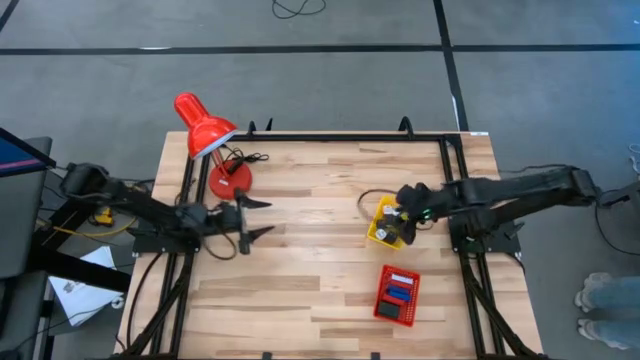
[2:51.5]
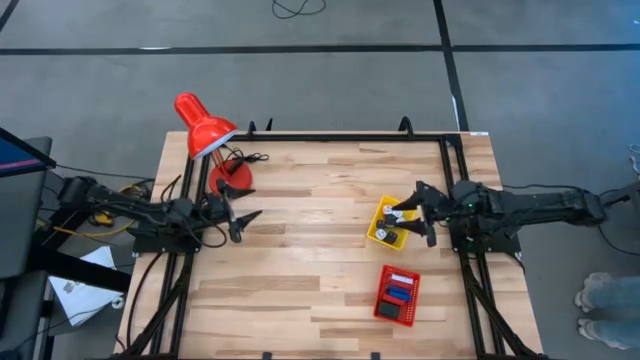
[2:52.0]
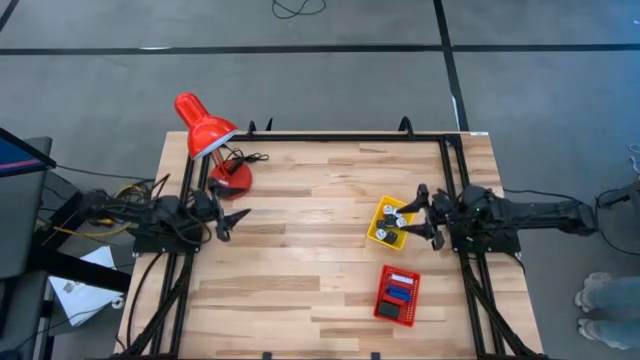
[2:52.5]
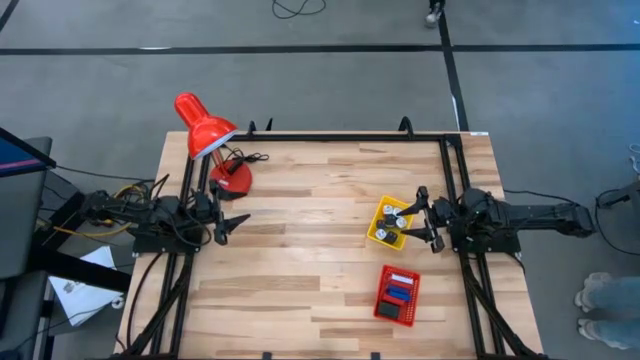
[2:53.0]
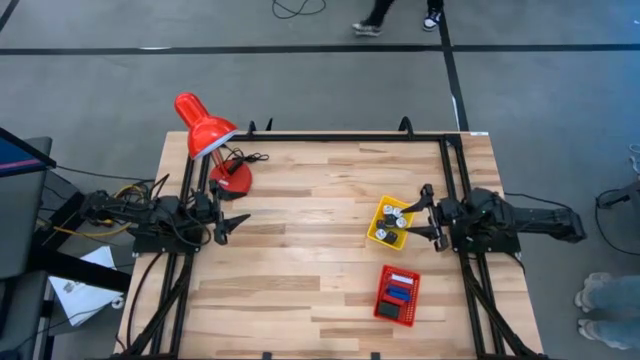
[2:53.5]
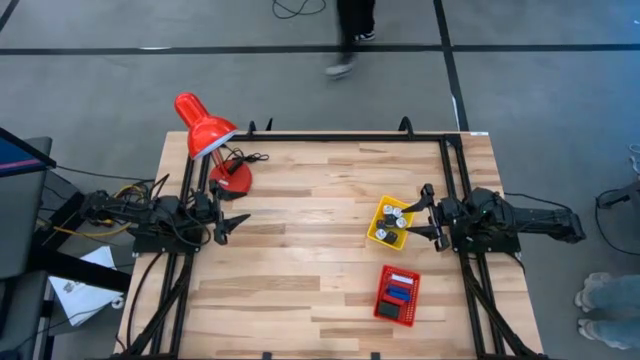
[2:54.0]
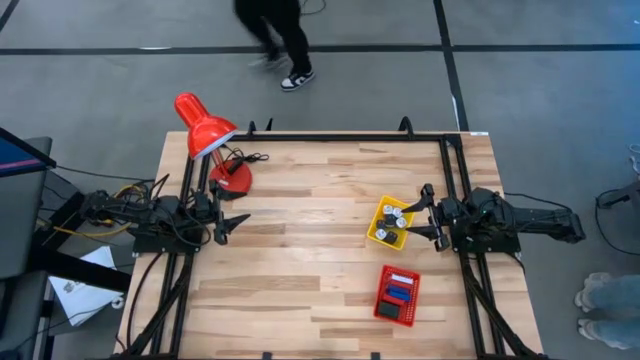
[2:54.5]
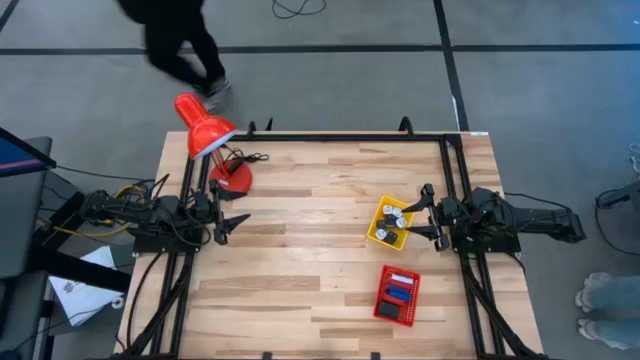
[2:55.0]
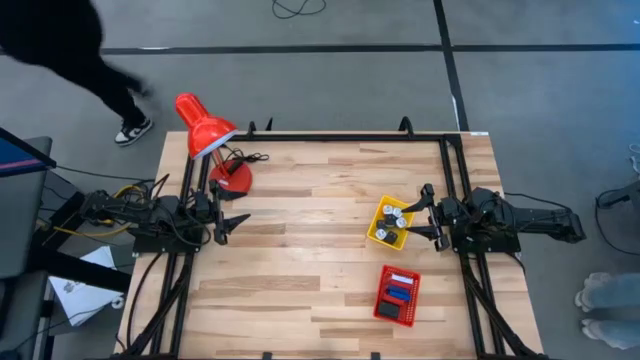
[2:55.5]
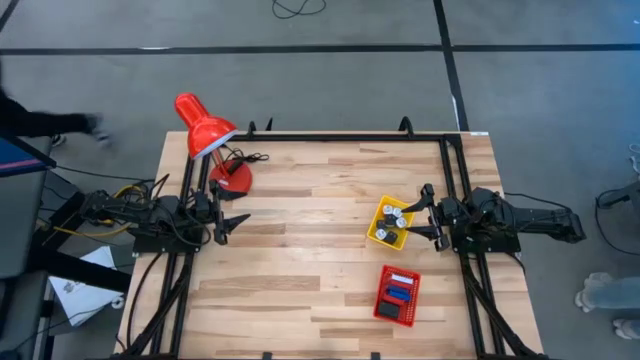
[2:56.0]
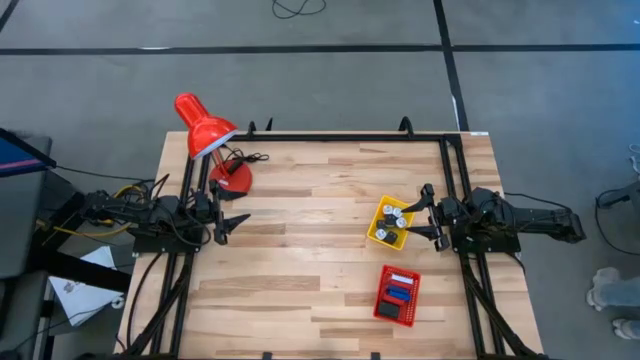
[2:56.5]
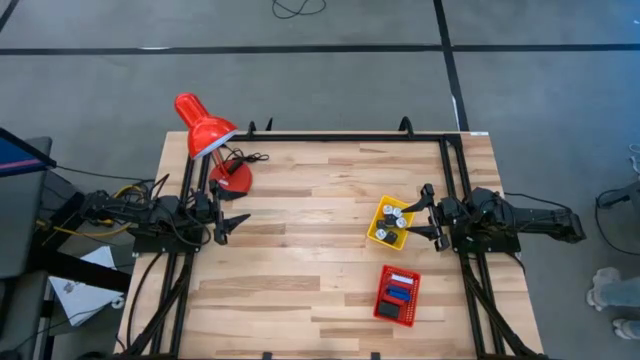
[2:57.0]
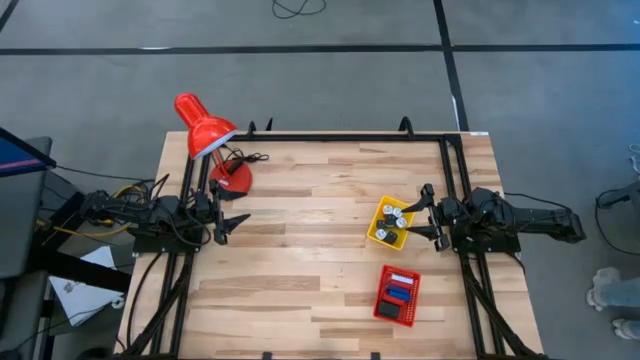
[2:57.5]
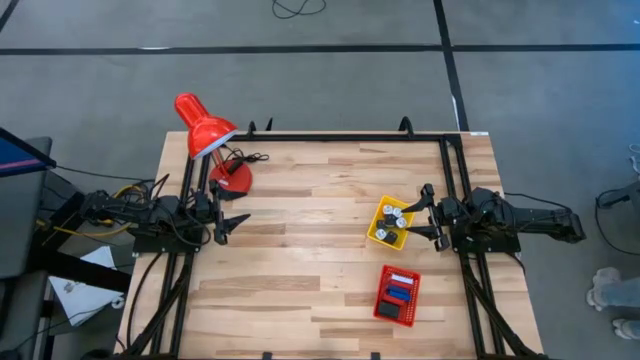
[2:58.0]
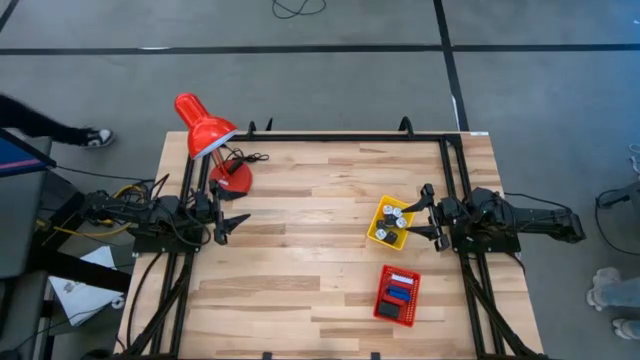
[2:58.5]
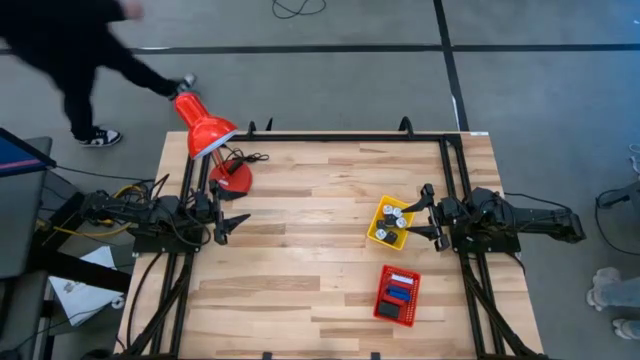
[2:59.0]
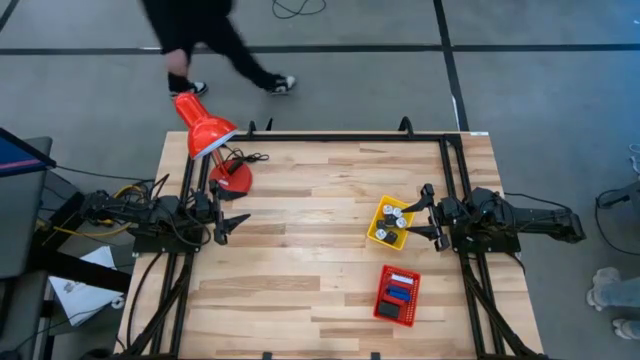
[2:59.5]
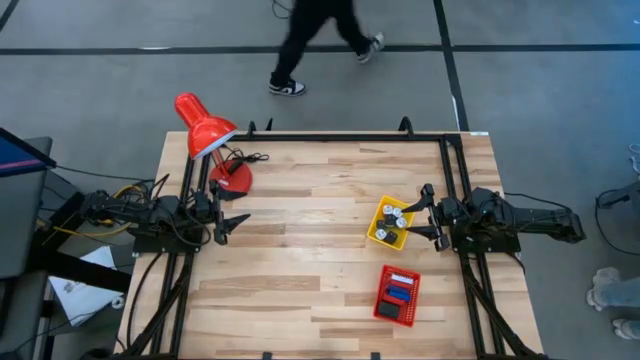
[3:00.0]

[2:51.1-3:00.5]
Task: Pick & Place Office items
Return to Home Position

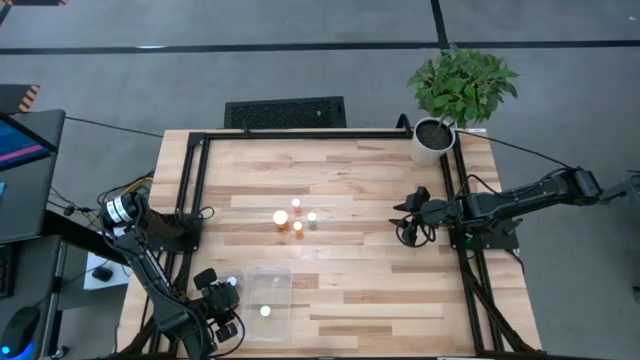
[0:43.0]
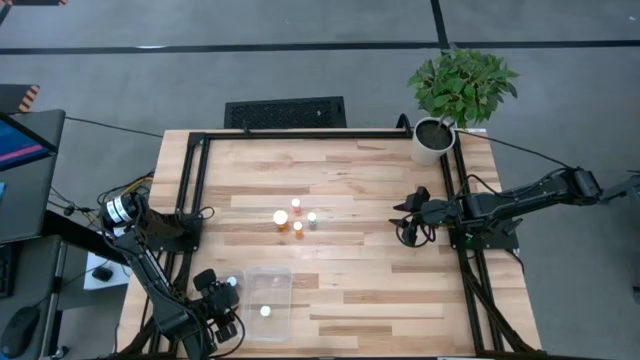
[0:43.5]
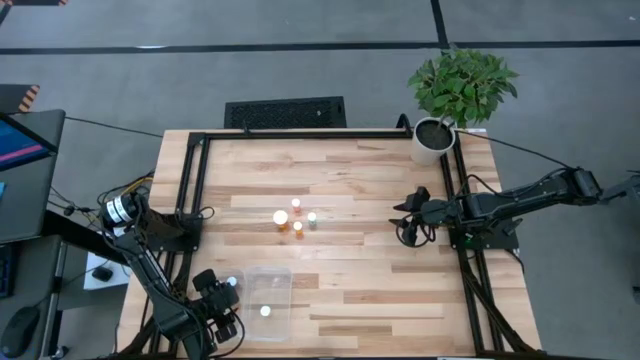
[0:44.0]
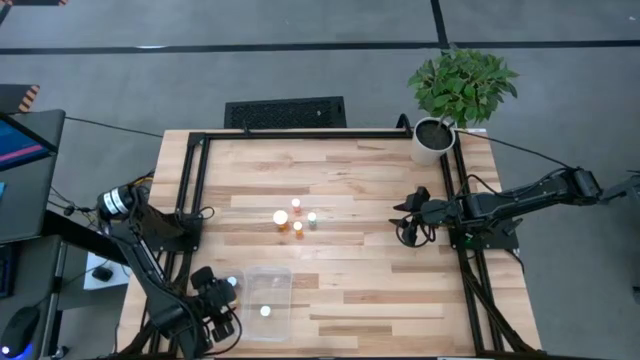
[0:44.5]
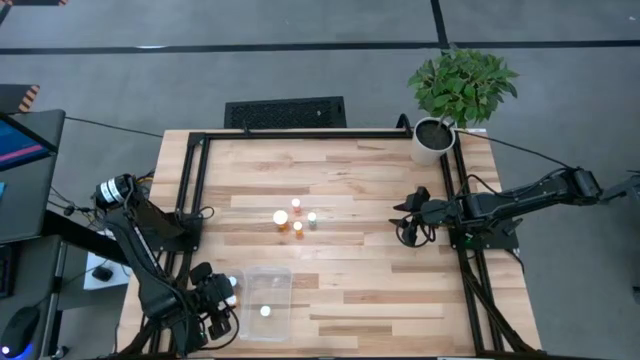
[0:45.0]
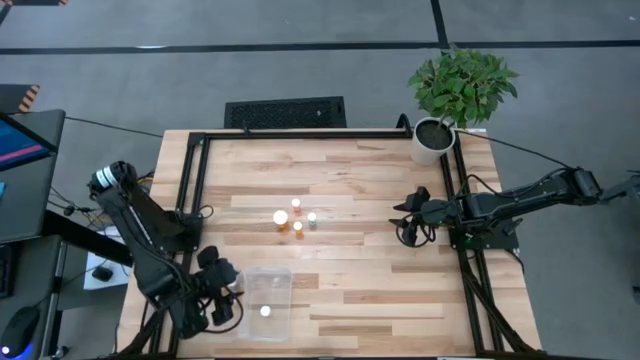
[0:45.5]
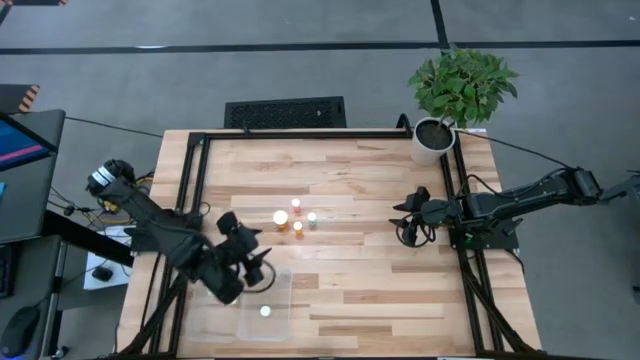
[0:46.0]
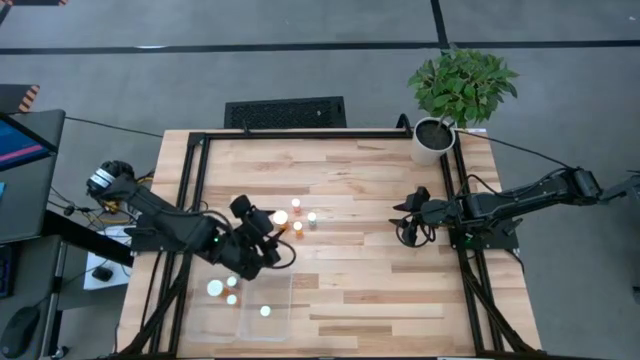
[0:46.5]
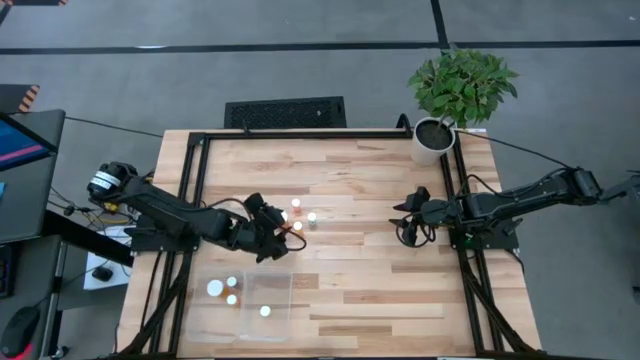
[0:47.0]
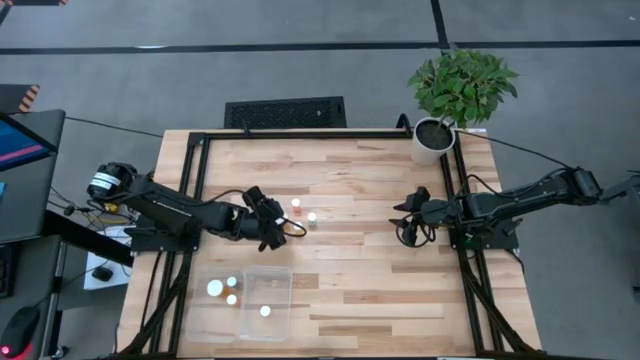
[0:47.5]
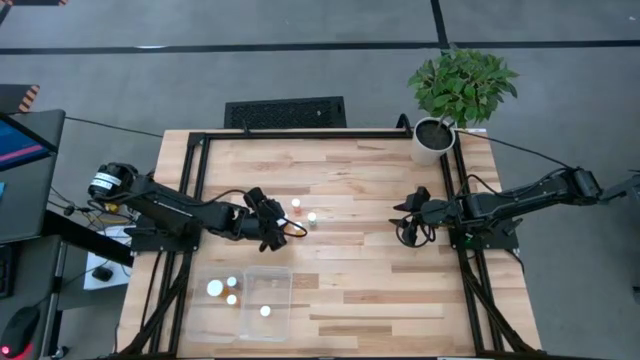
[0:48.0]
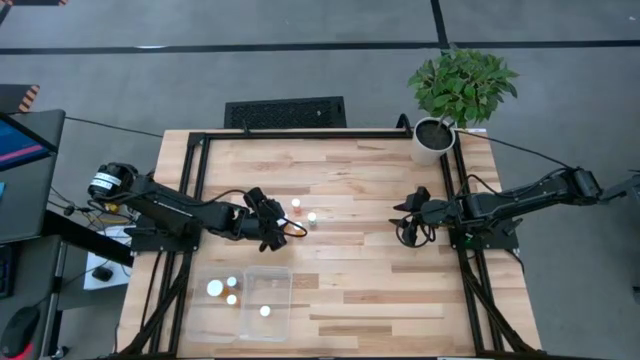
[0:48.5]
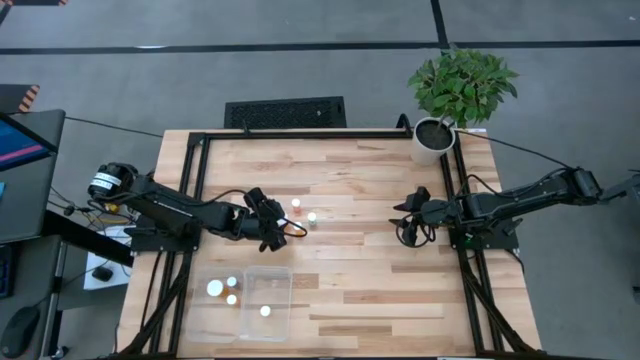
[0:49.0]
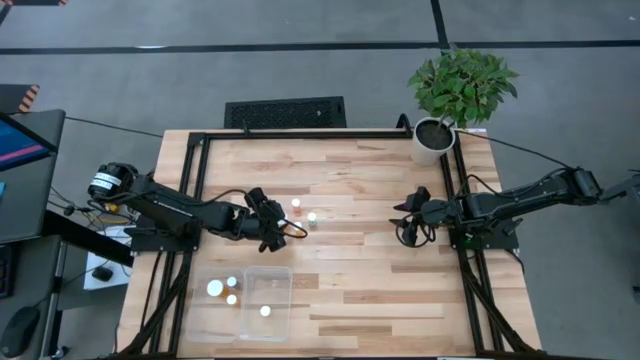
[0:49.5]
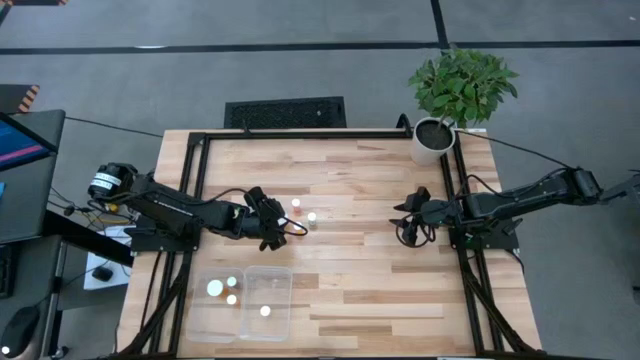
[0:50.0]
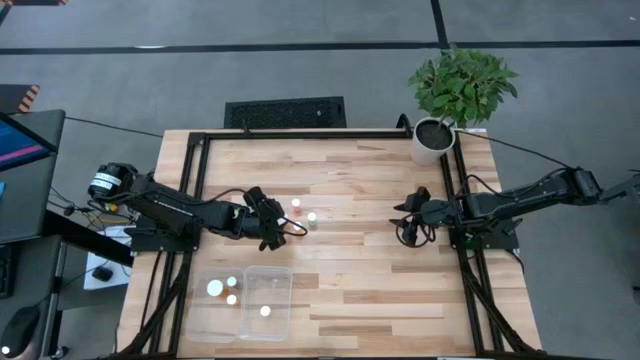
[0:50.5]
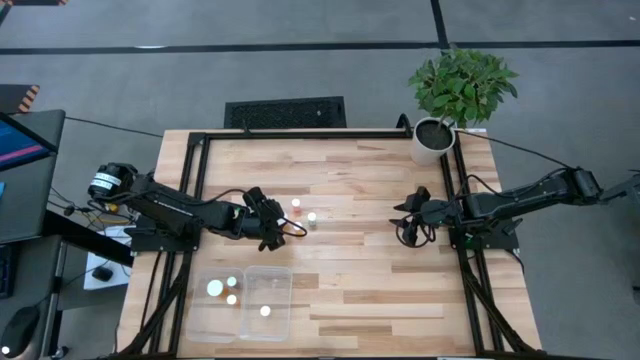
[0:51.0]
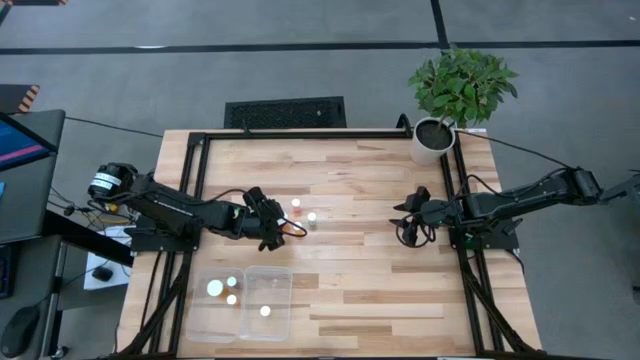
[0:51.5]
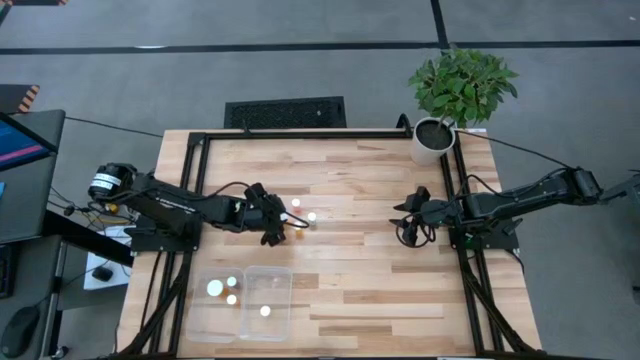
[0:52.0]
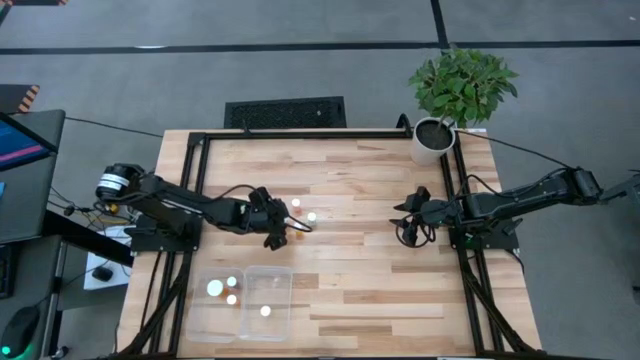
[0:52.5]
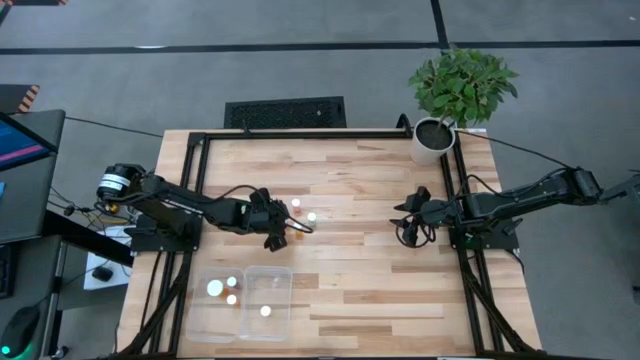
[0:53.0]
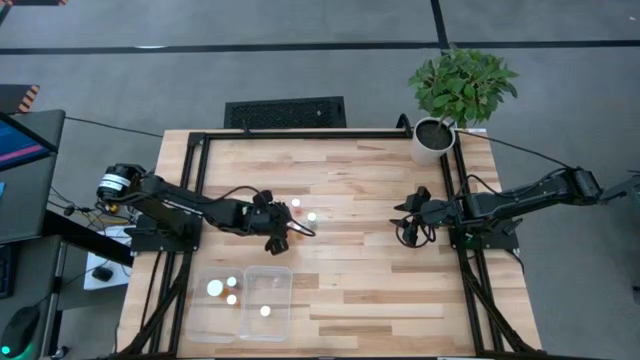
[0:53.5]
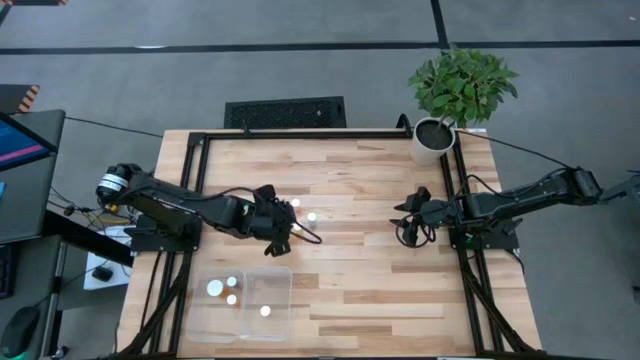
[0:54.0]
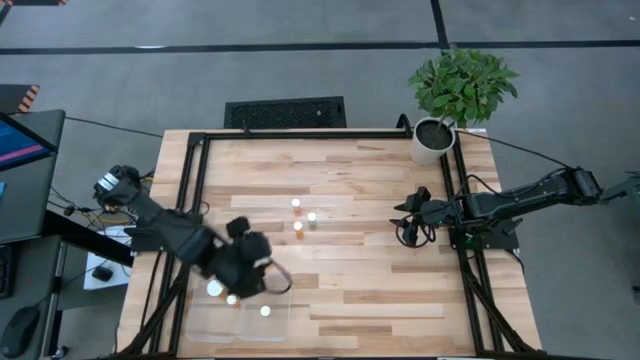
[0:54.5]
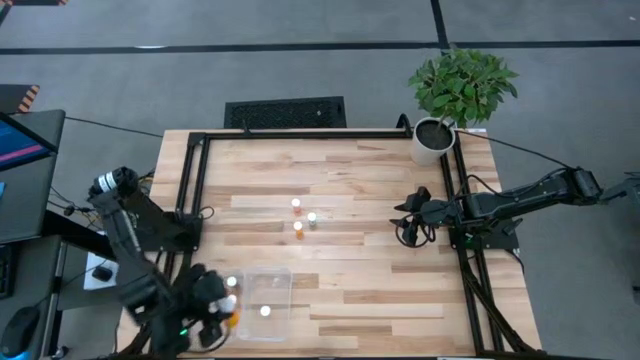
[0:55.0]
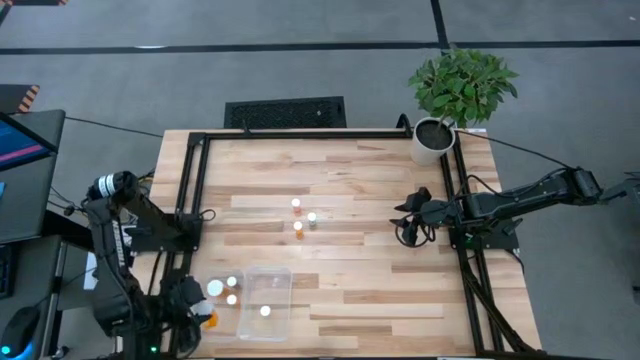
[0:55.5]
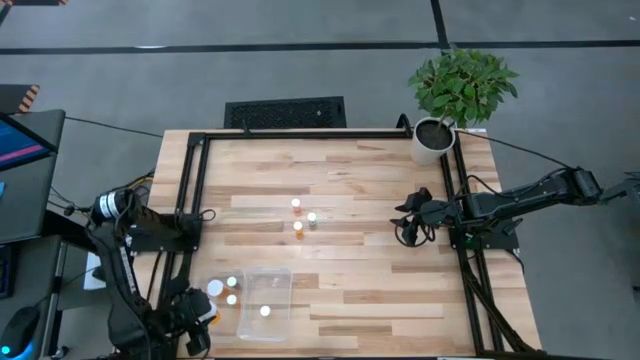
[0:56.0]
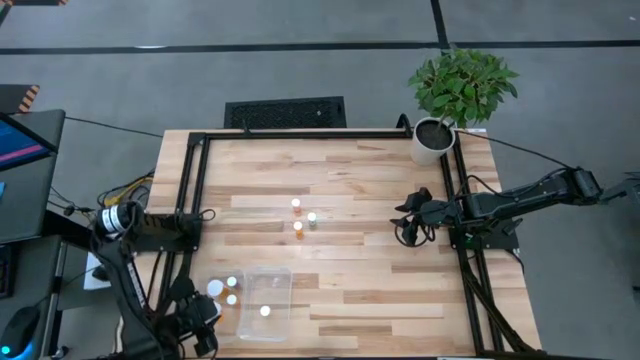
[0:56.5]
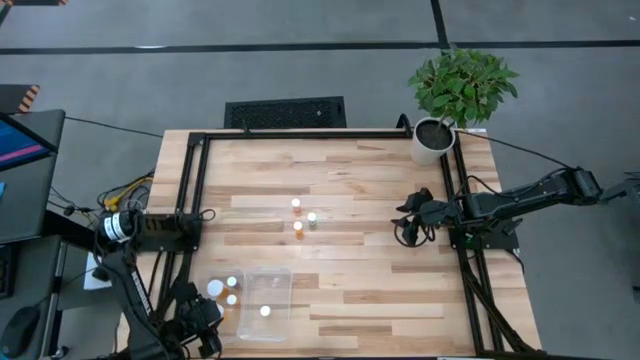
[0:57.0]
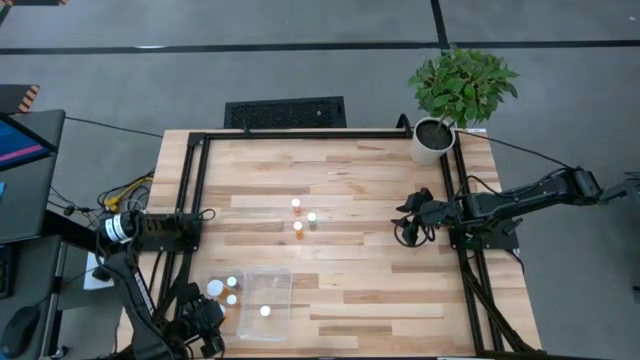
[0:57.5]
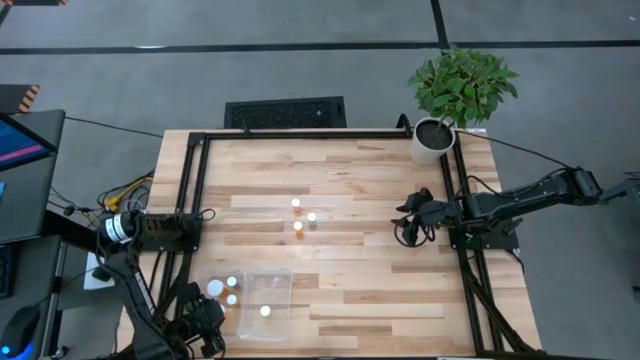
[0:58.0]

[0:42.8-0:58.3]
Task: Pick and place medicine bottles into bin by pill shape (circle, oval)
Put the large orange pill bottle into the left transparent bin
